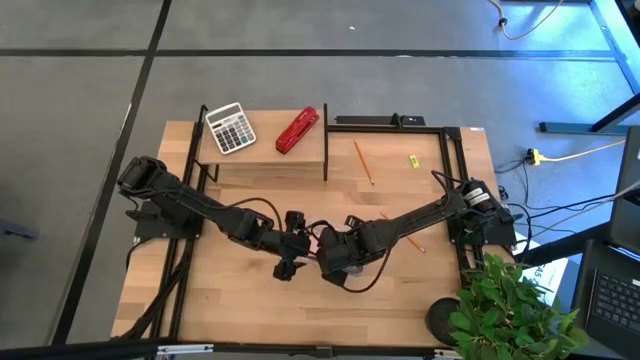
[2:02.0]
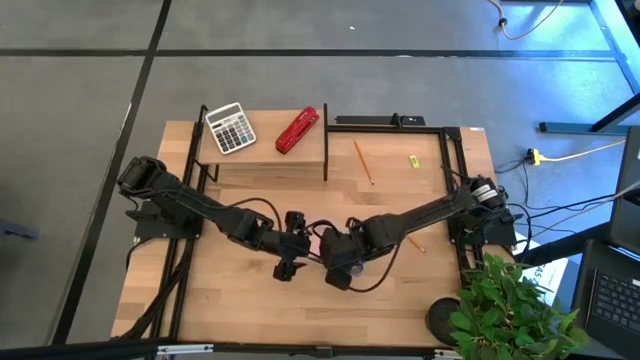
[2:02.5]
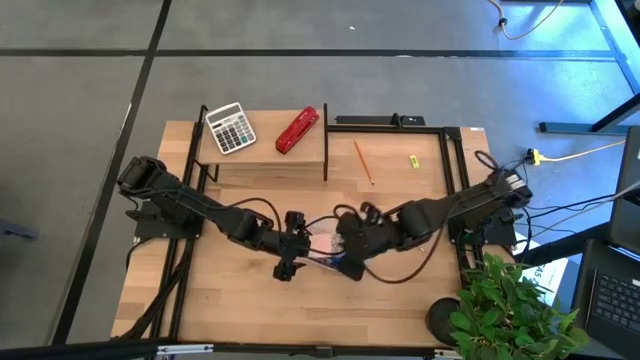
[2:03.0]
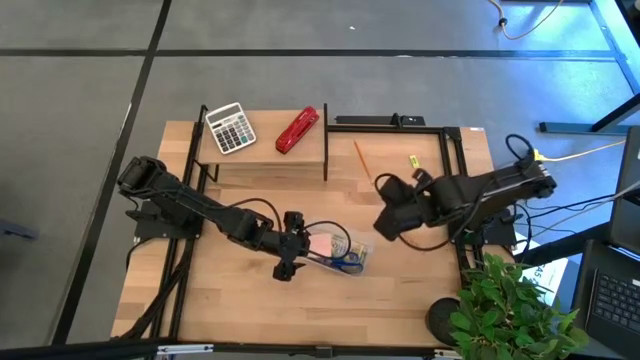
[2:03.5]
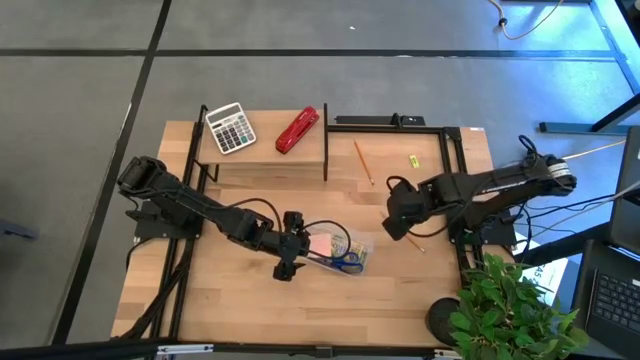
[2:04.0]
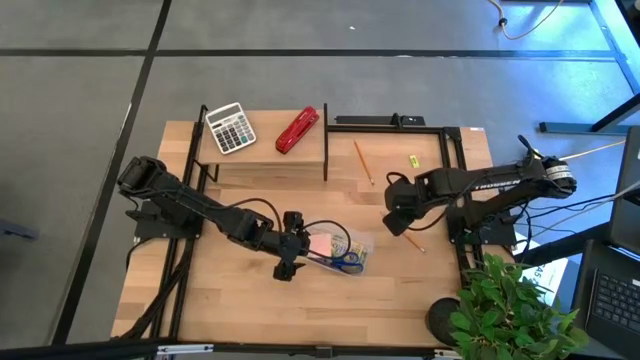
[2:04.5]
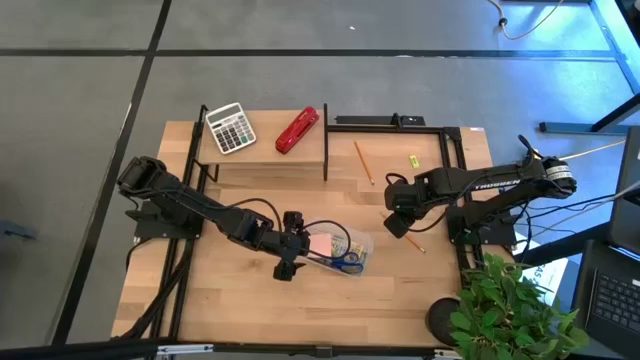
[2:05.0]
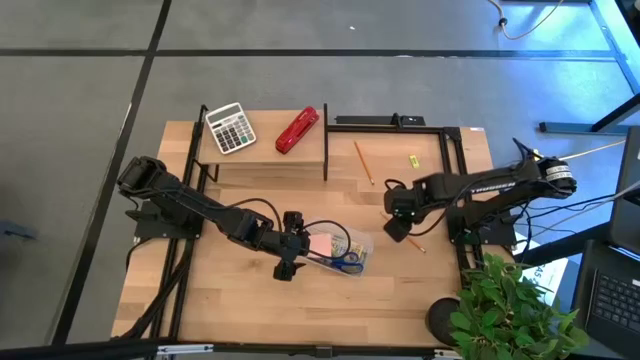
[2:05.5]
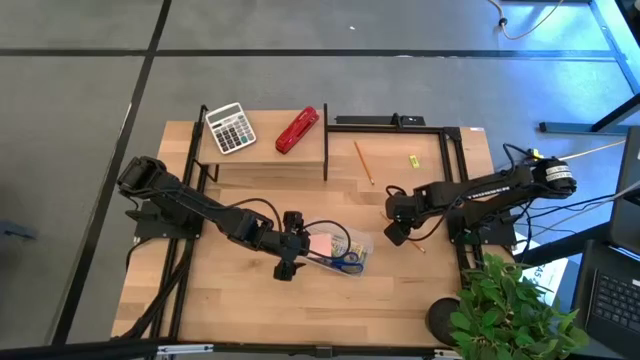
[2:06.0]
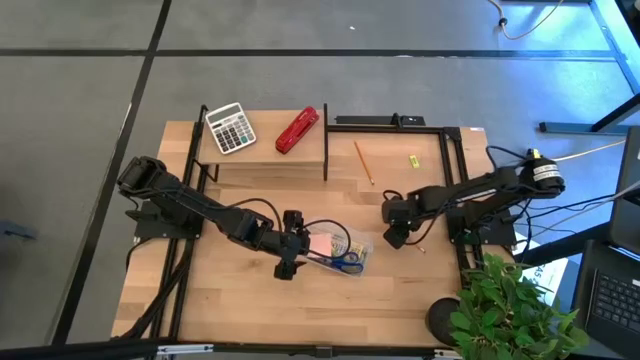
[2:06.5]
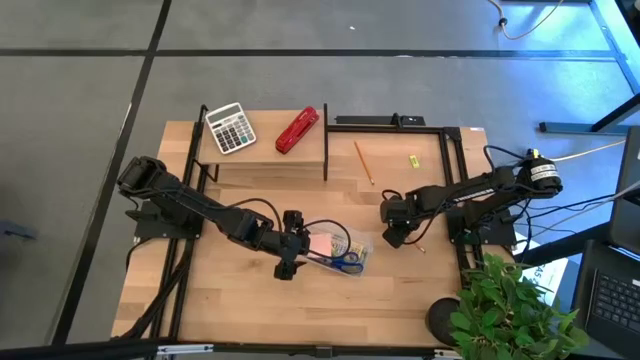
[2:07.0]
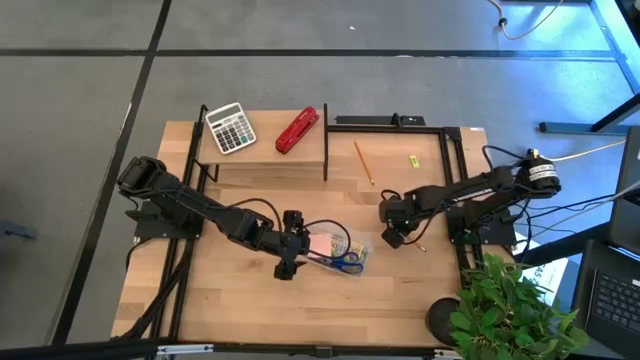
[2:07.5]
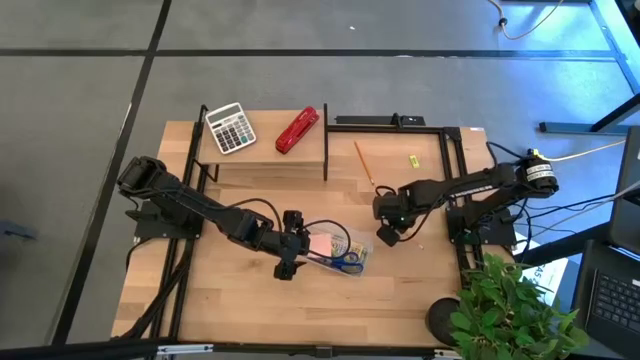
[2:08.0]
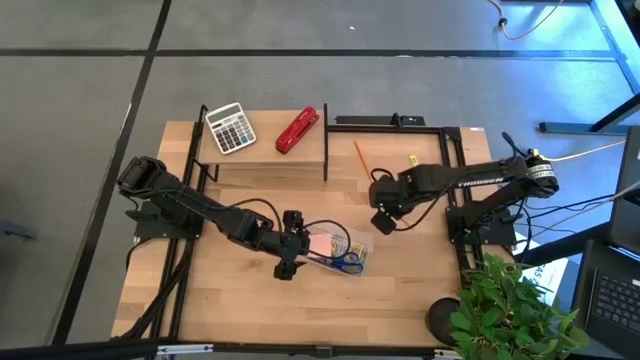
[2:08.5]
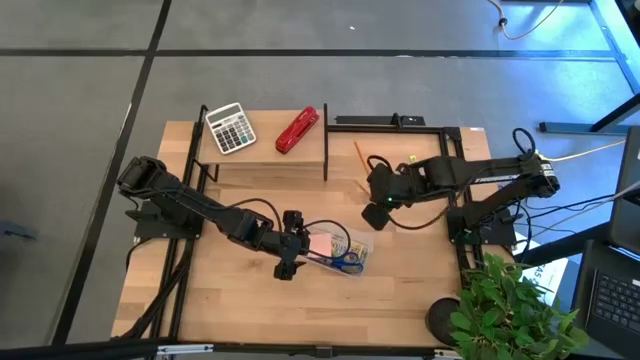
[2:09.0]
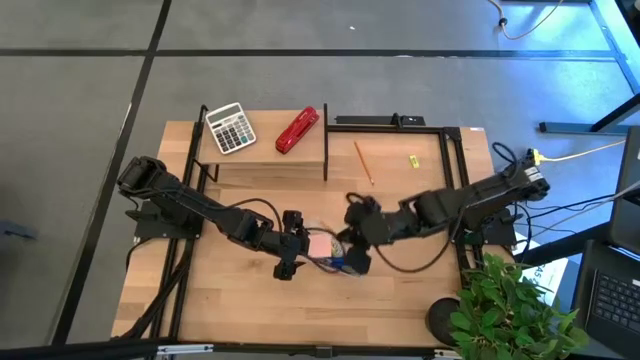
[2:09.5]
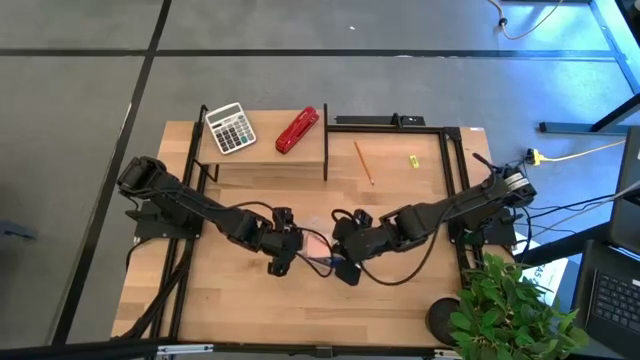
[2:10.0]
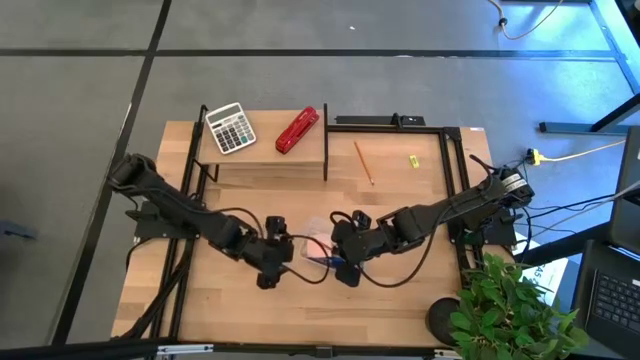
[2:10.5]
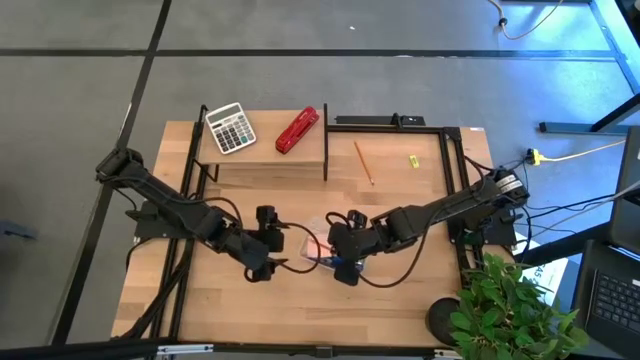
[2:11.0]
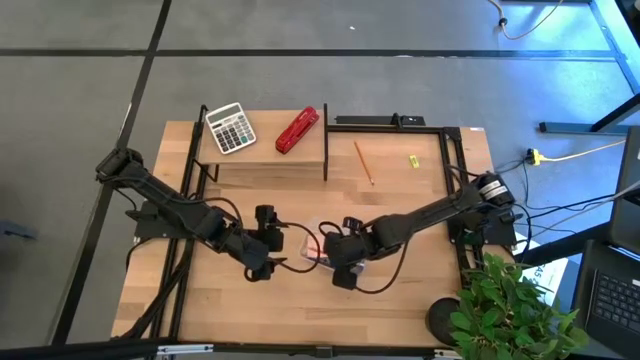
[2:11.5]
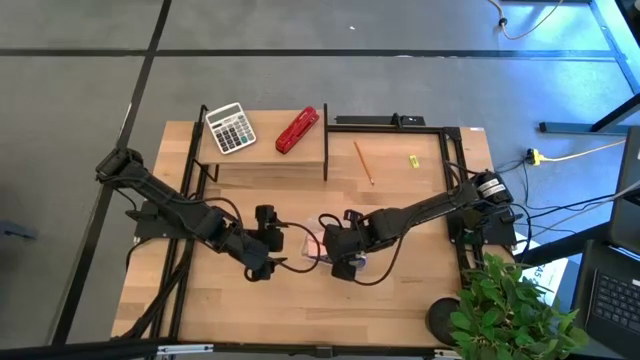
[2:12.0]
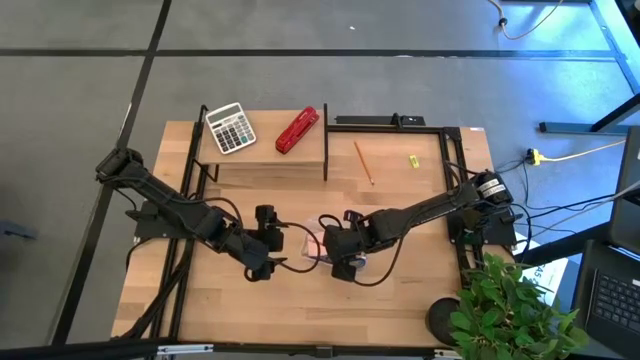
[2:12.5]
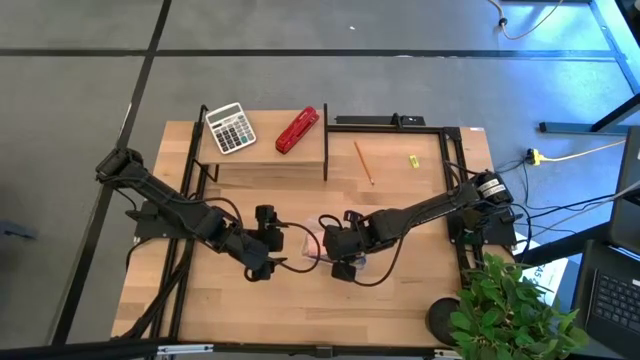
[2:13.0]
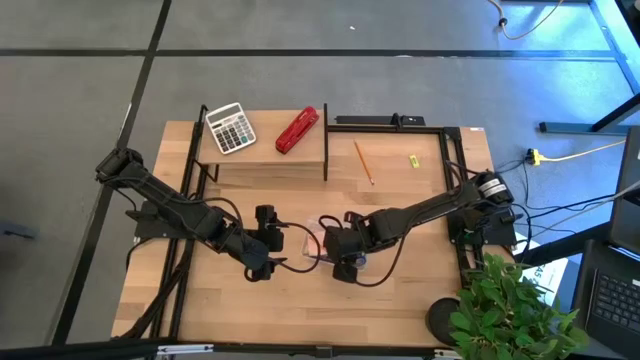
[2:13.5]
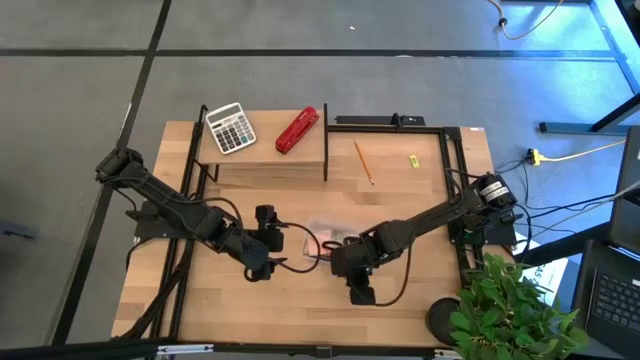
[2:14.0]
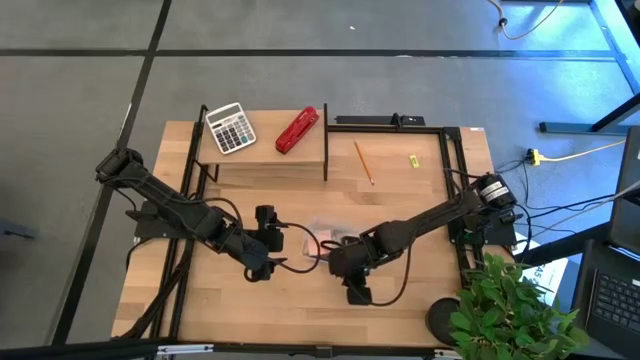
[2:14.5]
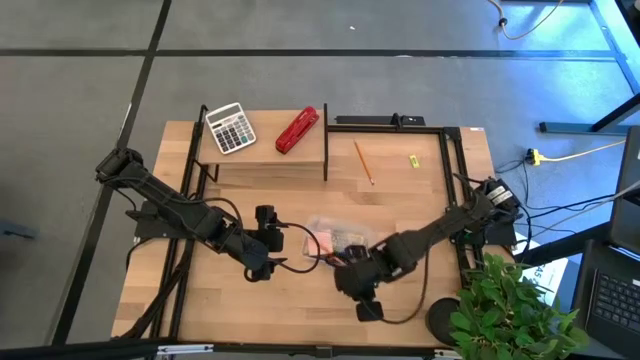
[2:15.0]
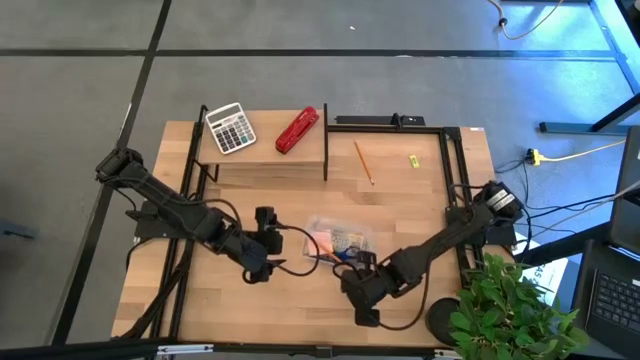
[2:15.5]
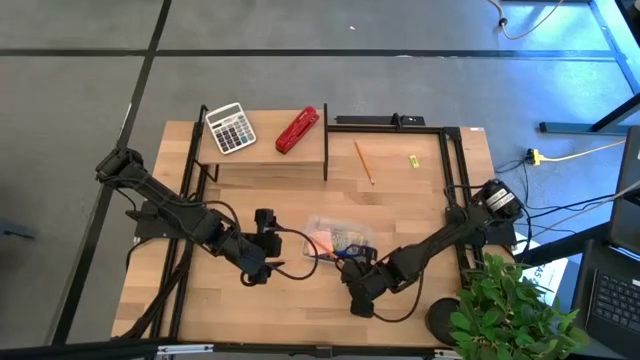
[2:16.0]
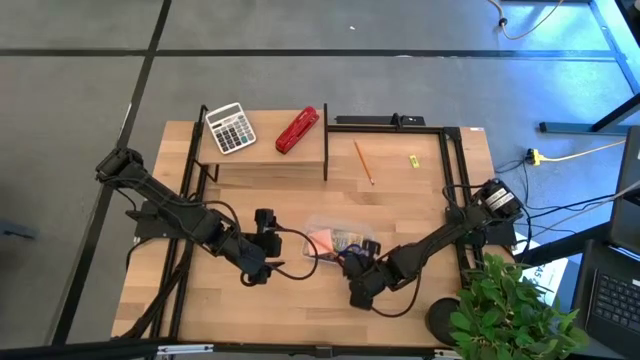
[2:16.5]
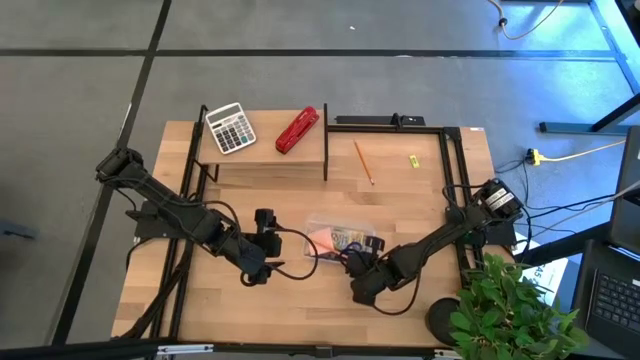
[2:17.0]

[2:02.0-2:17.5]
Task: Pack school essentials
Put the bottom orange pencil into the transparent supply box

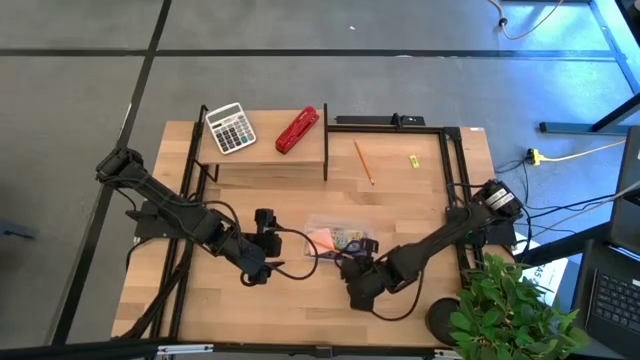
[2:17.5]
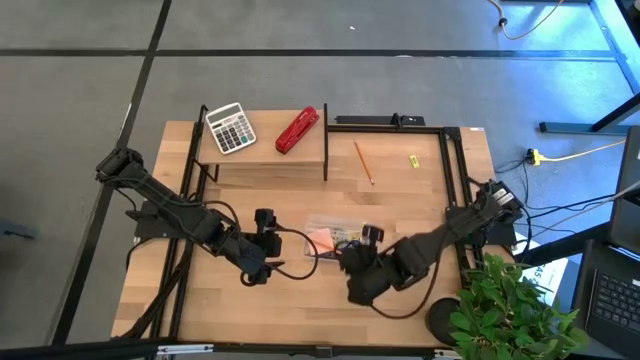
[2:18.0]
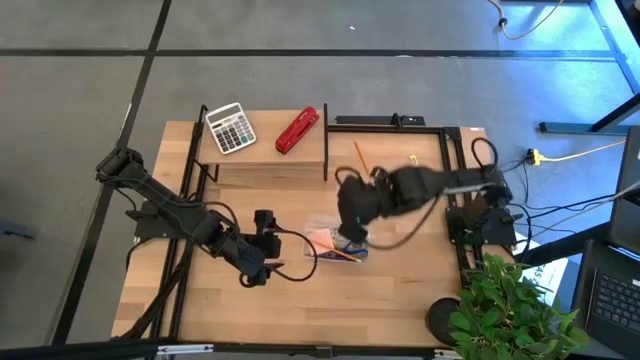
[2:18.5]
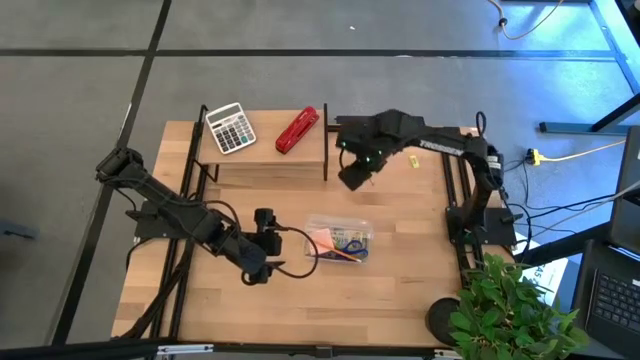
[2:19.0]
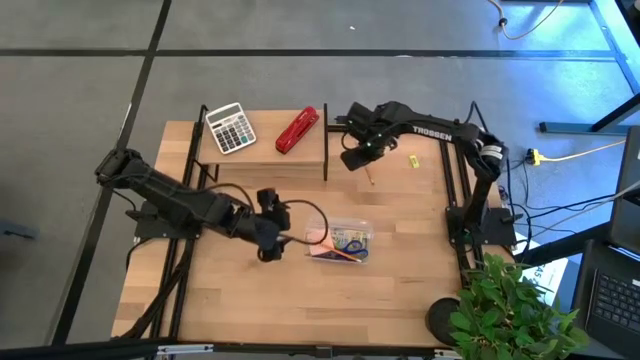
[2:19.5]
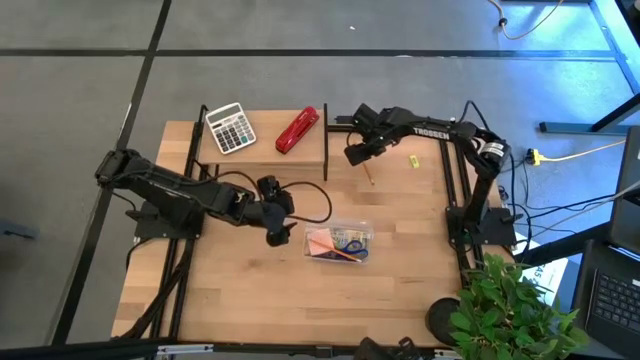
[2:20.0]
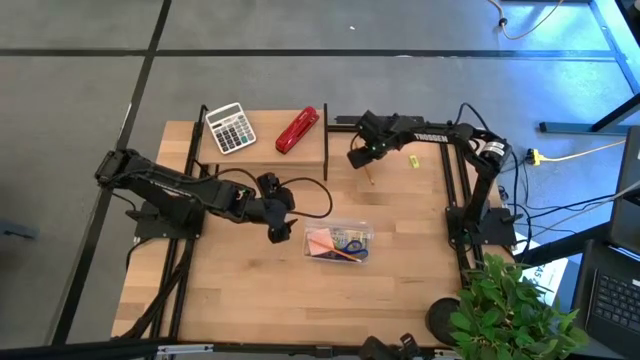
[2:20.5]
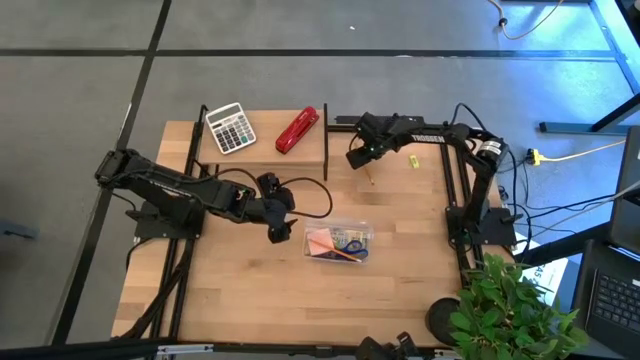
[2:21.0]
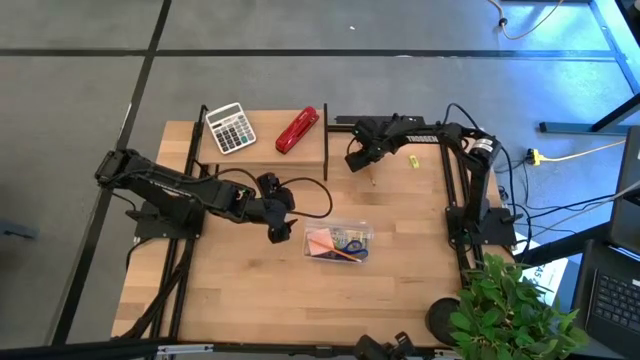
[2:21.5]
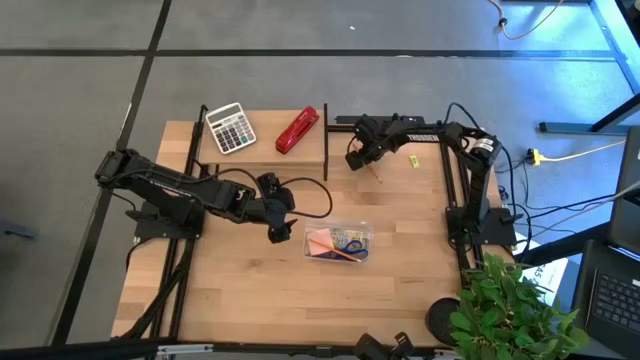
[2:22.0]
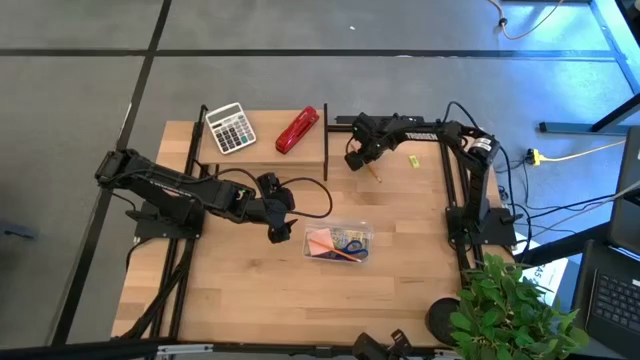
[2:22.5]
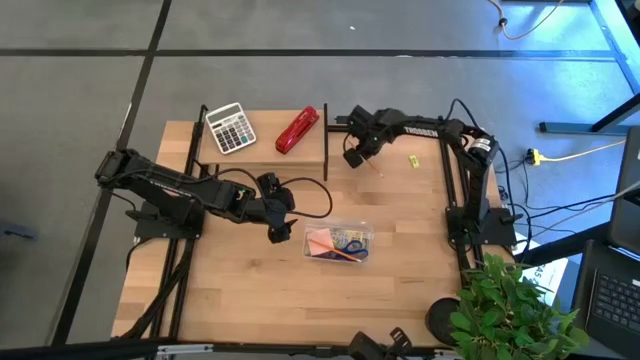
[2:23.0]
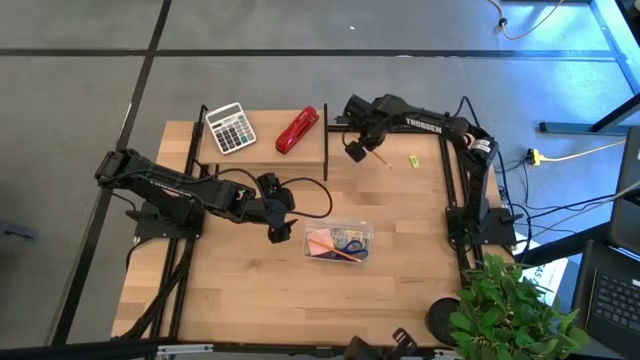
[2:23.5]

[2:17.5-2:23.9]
Put the orange pencil into the transparent supply box
